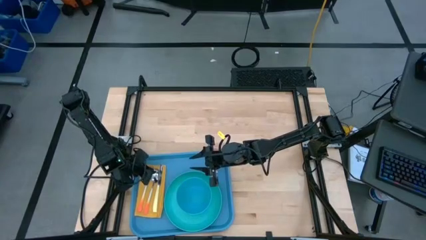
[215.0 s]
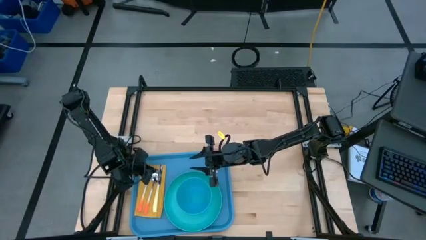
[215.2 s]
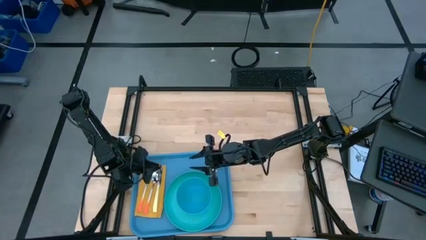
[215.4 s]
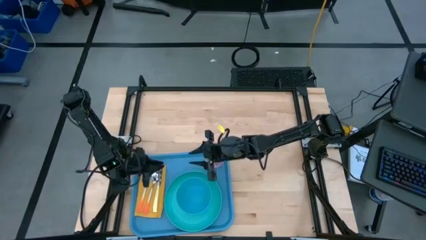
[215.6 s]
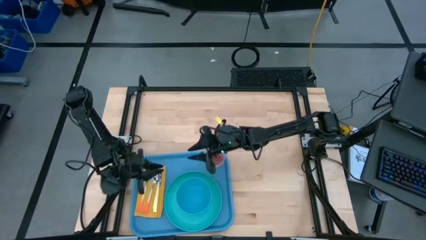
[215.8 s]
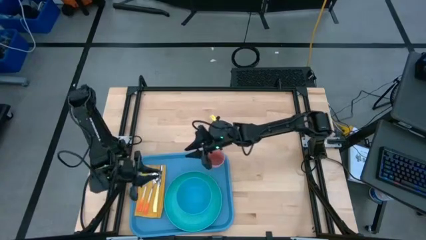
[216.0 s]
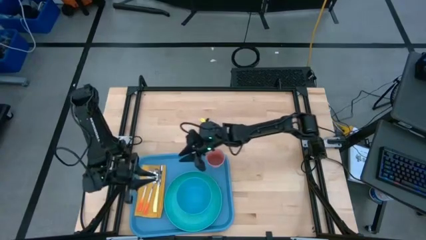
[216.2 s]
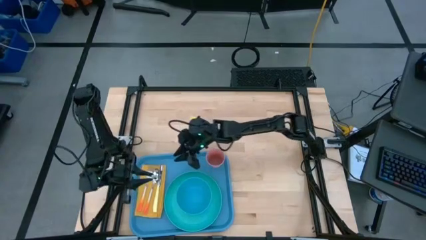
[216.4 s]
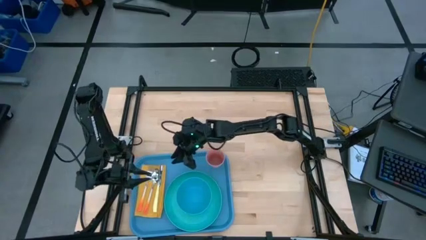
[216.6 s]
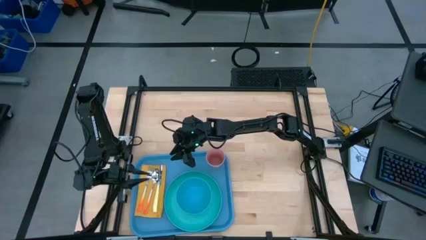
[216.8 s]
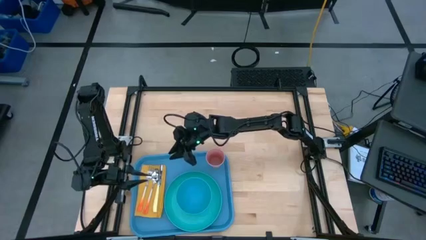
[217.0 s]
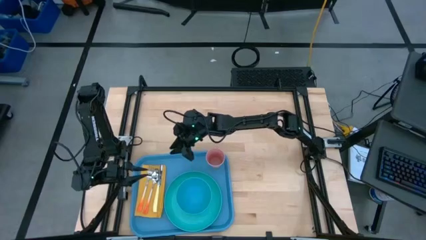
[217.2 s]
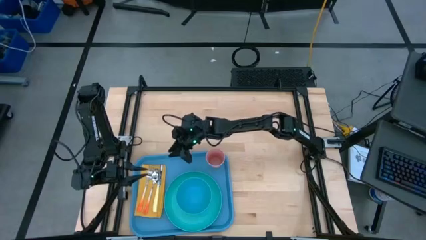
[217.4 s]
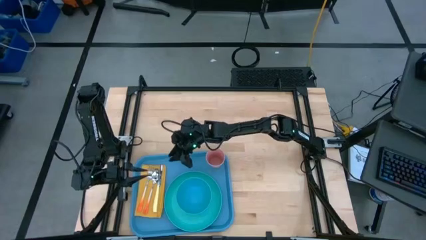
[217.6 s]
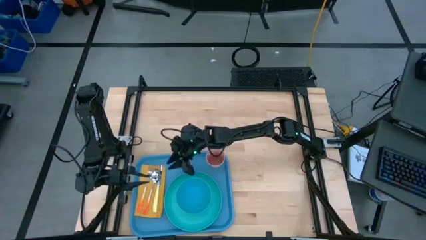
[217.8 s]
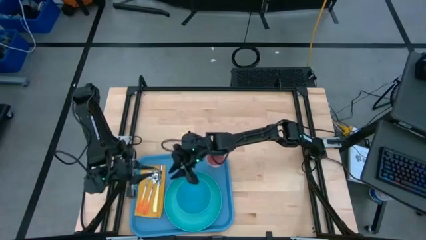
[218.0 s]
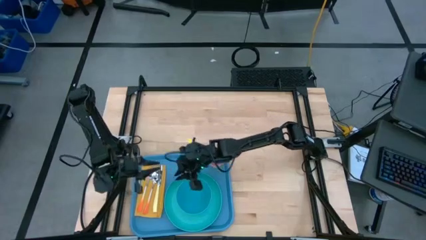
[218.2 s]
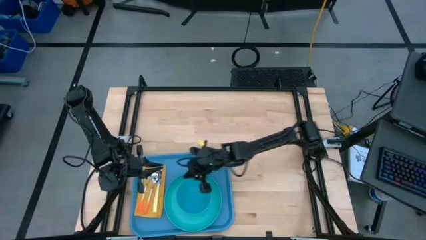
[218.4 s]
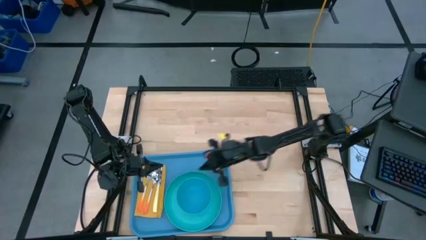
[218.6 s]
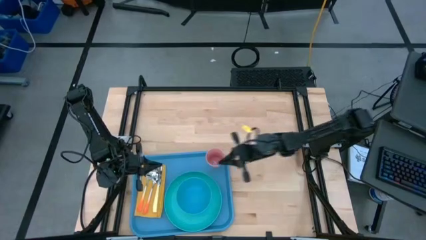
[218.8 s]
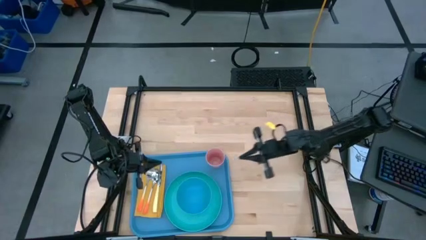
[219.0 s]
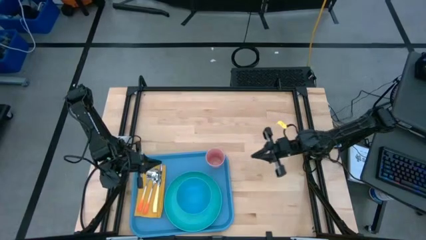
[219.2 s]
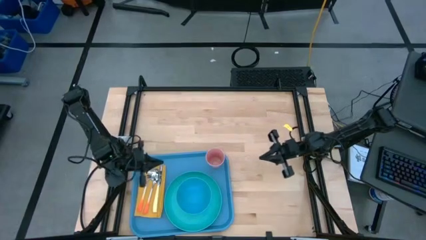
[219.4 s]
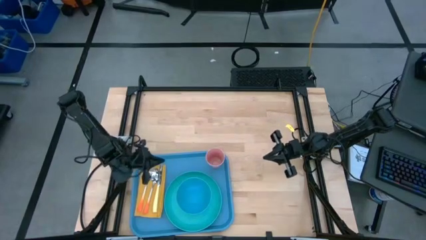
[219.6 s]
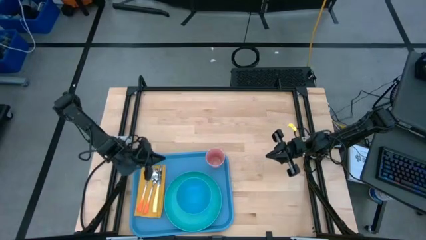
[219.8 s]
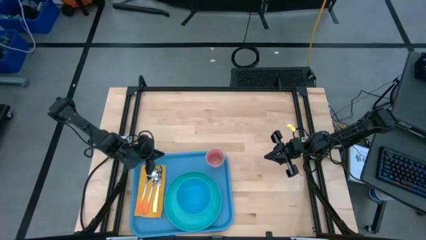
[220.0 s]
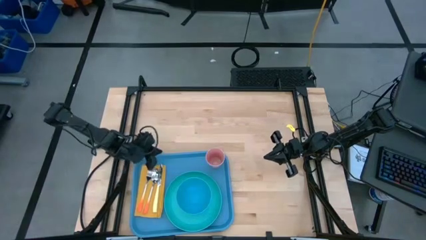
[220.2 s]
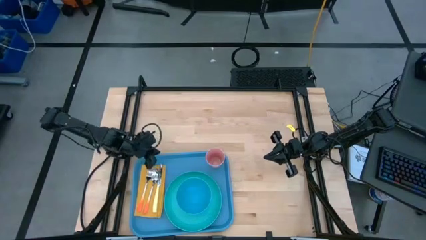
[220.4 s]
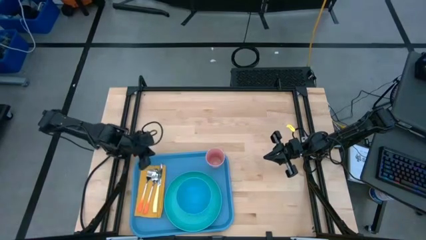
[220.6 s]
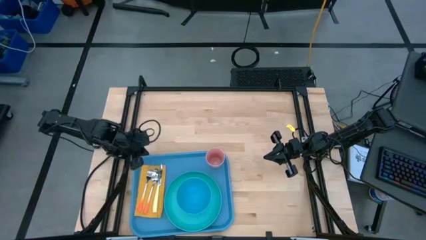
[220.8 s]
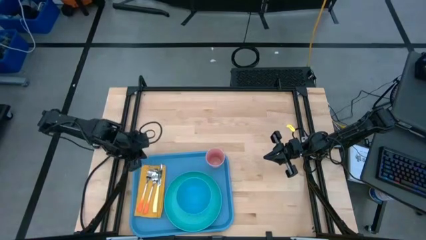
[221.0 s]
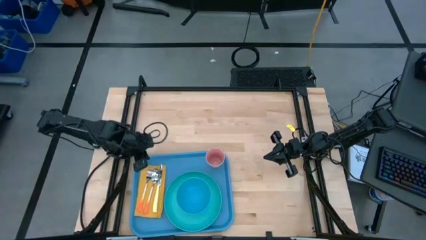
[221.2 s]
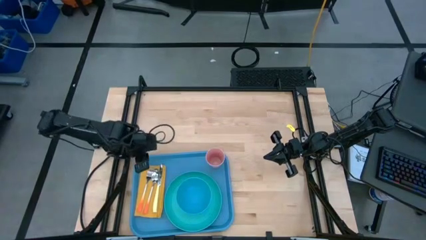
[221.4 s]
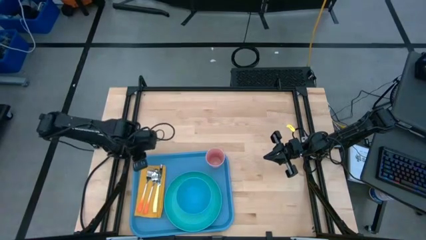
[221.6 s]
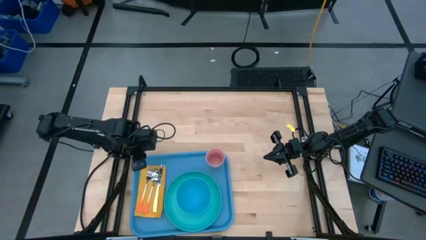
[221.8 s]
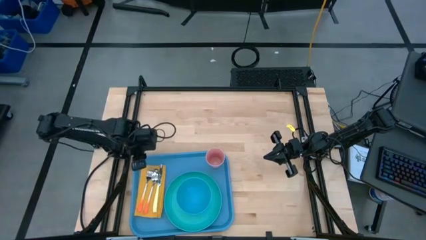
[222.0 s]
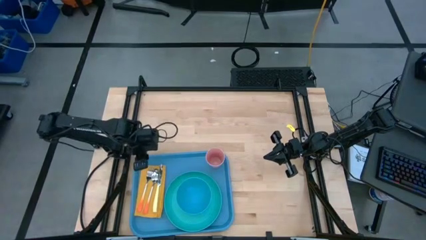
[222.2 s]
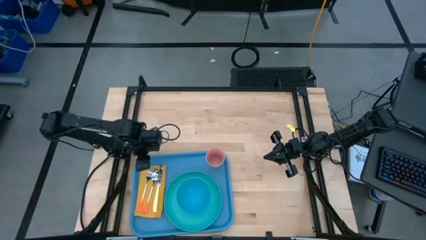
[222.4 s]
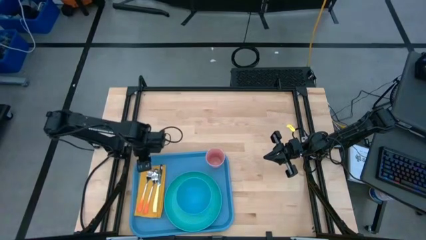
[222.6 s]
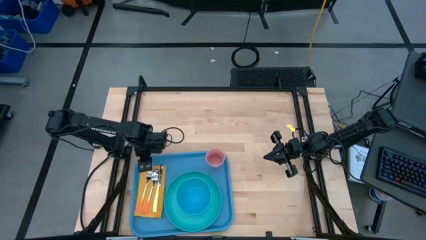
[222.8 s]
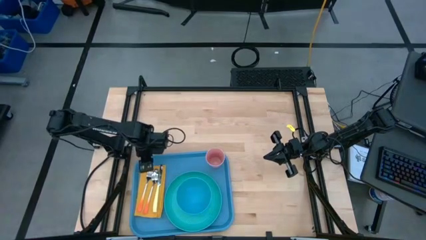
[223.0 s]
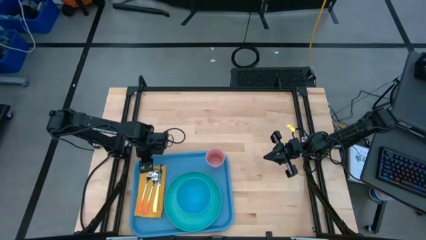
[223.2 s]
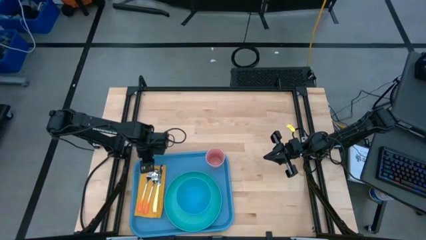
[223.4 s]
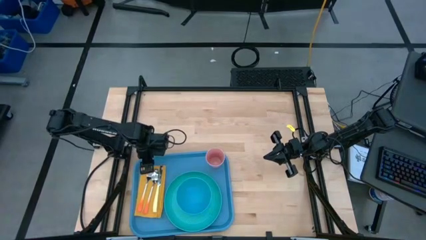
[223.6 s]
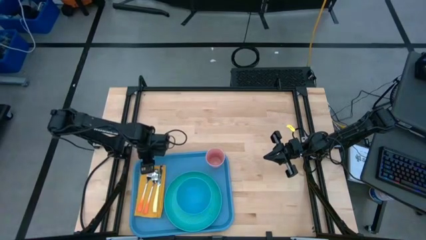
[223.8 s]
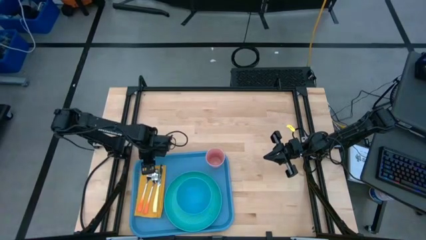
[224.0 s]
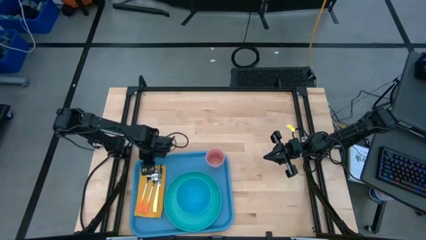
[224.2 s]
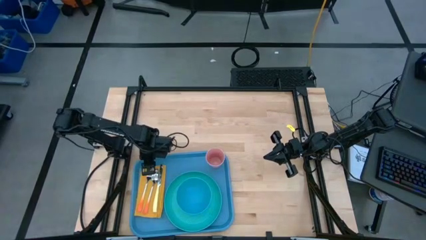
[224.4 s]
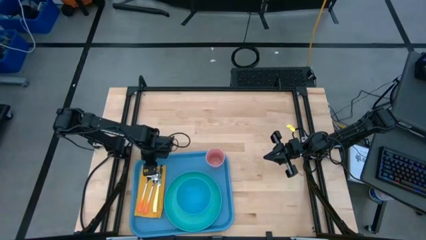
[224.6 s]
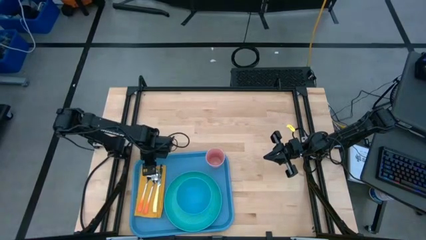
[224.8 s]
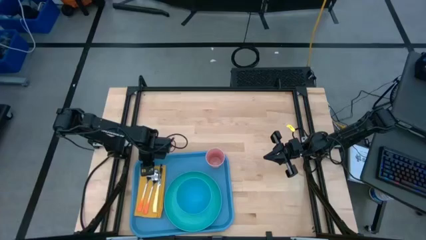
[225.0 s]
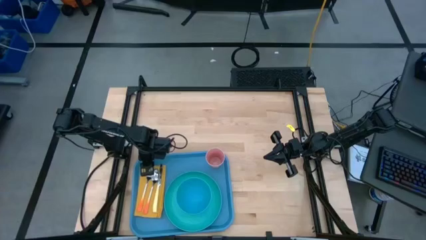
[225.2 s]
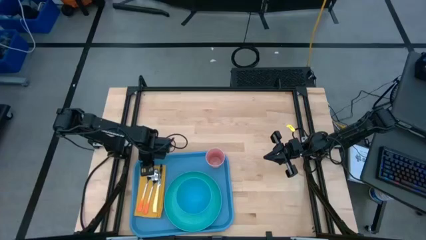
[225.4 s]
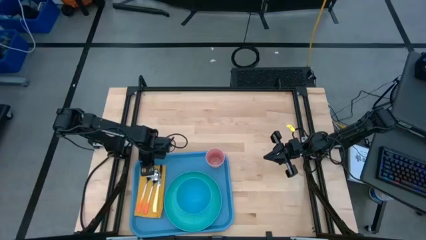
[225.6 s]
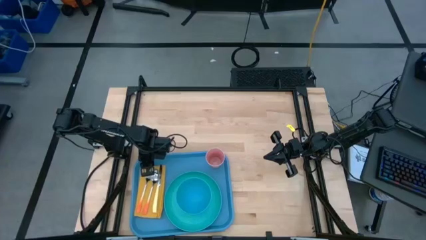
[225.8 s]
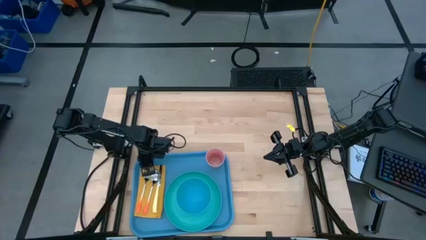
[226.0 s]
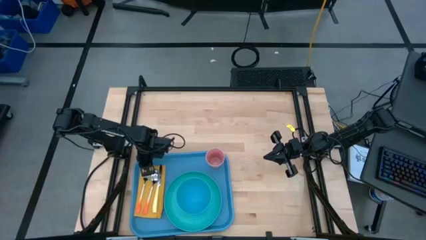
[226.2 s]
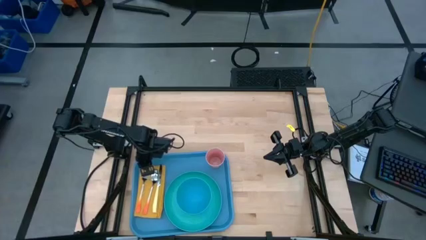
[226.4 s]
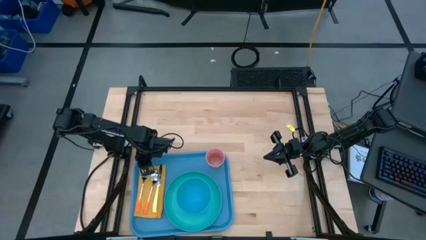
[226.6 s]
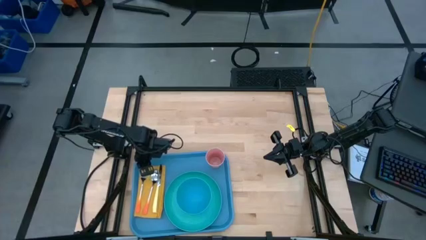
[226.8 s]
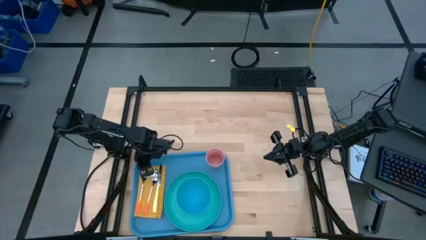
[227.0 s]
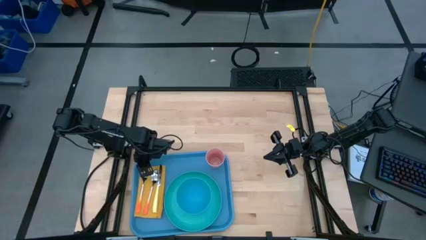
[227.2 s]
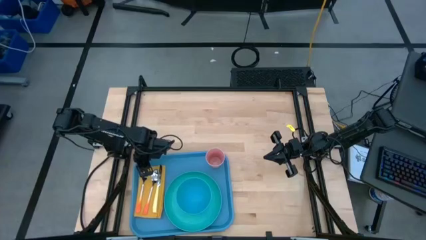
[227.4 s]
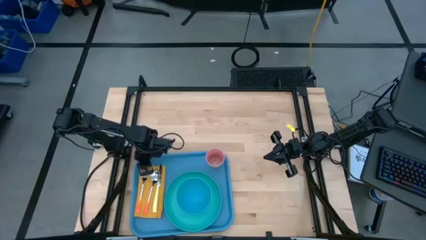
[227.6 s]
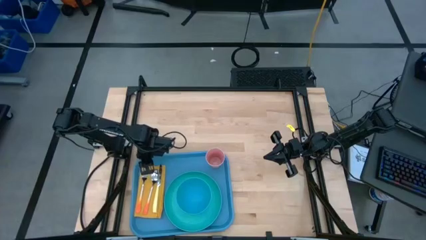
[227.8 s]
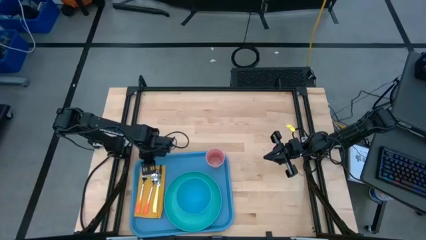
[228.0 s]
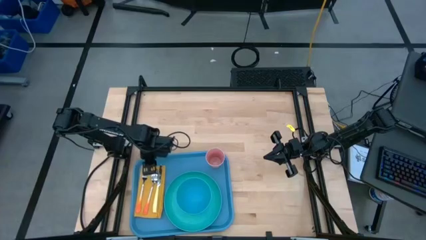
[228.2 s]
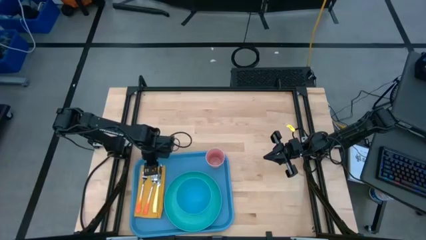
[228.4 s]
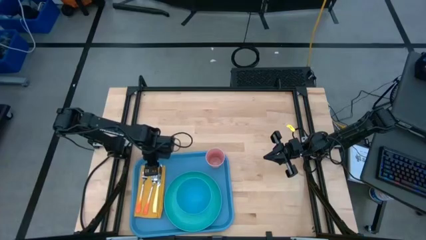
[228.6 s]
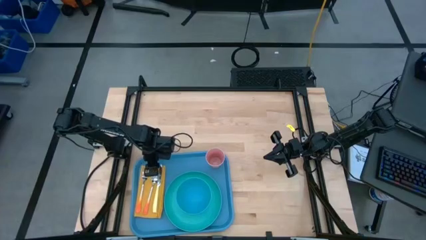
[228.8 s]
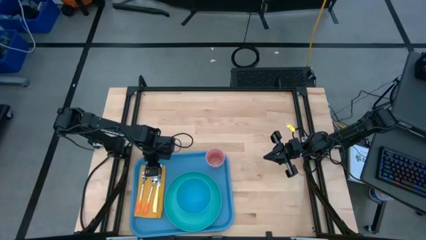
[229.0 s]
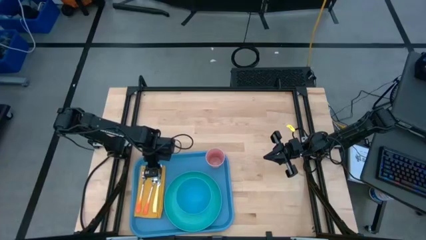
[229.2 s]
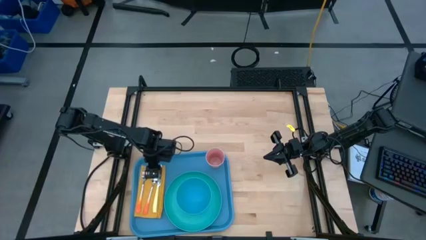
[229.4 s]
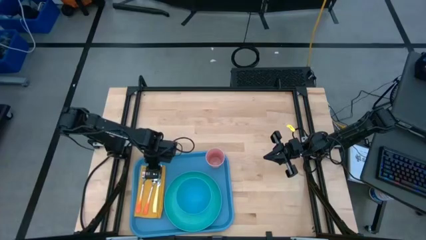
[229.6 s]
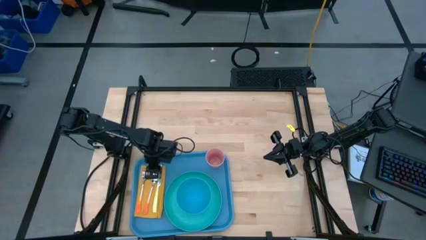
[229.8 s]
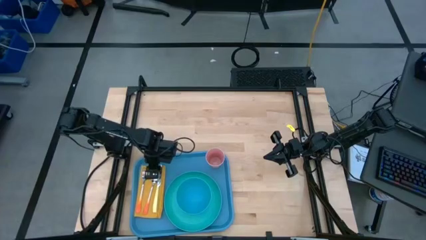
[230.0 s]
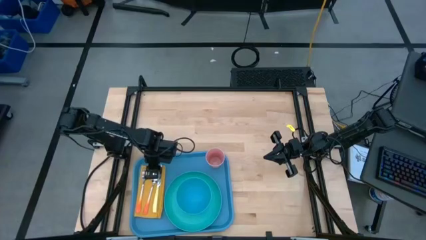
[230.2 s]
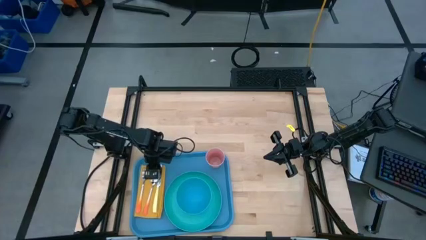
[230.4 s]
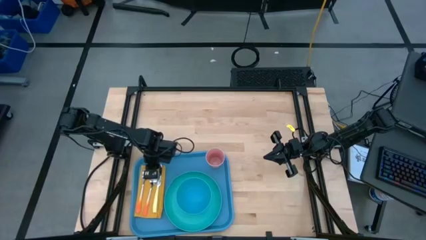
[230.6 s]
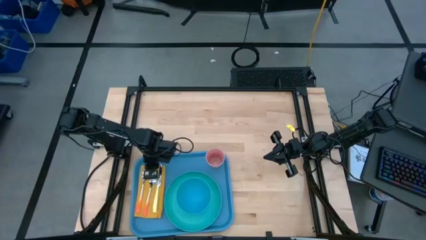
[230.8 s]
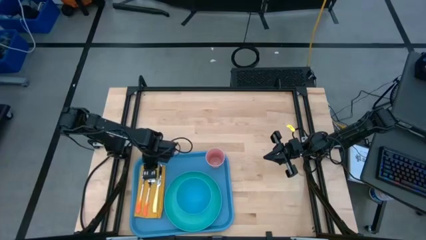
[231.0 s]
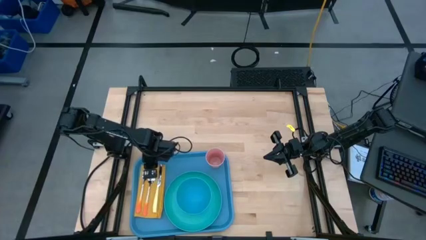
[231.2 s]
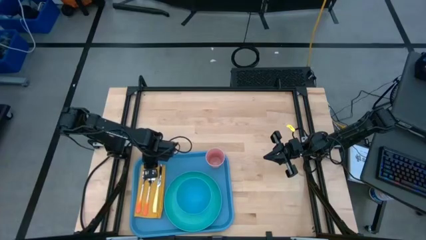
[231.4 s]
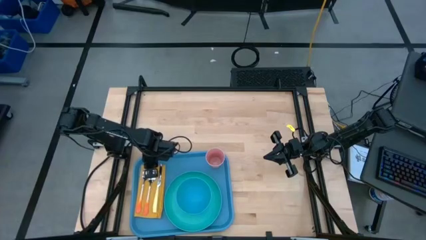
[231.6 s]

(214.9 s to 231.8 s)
Task: Set up tray
Adjust the utensils on top of the yellow table napkin on the blue tray

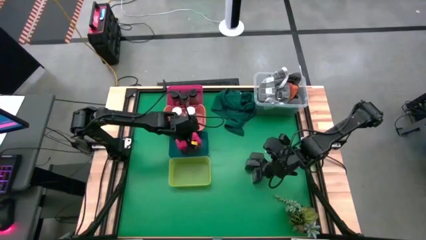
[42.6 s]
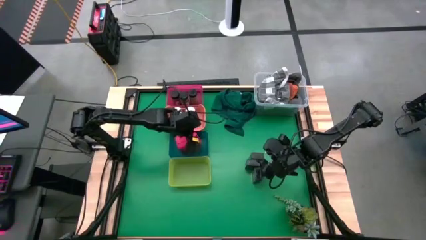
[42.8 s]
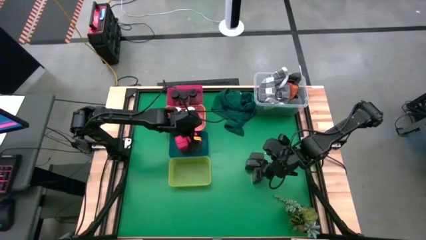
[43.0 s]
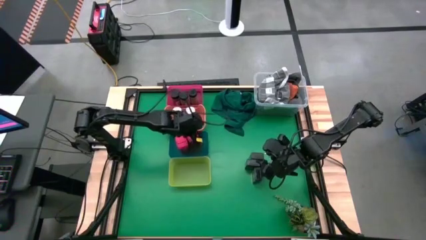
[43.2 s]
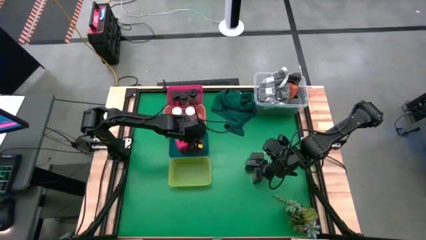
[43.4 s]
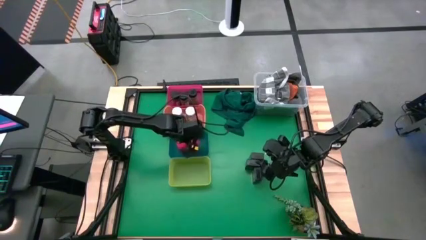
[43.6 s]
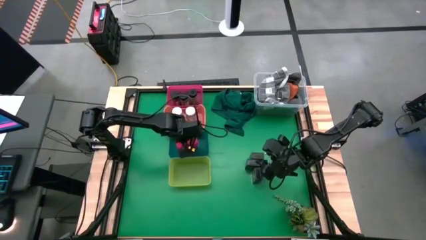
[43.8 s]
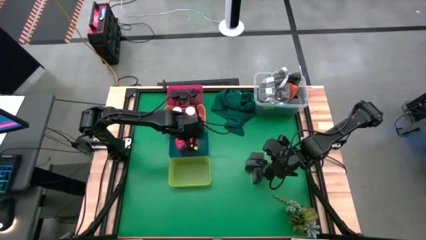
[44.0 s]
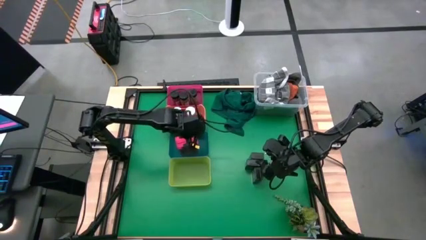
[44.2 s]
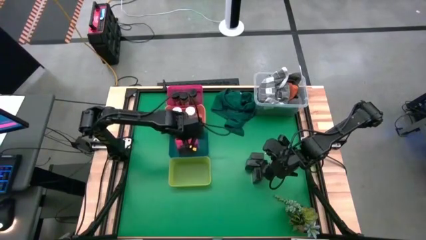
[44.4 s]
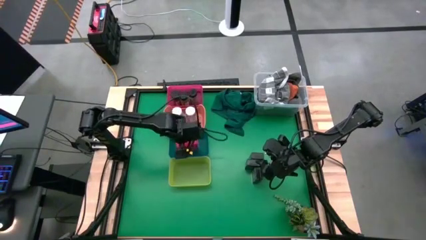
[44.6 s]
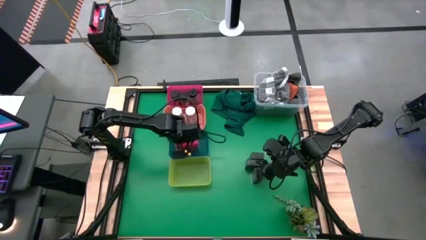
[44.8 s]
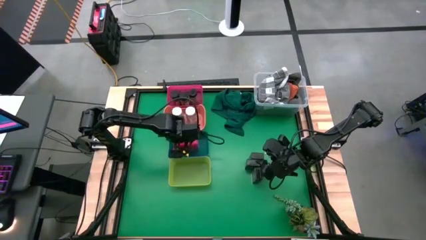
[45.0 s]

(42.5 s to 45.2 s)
Task: Sort spices by type
Adjust the red spice cans on the blue bin
